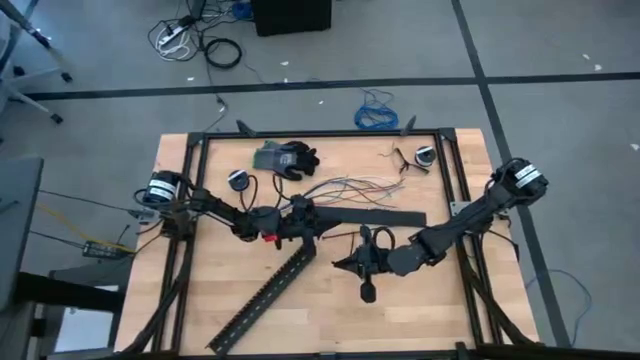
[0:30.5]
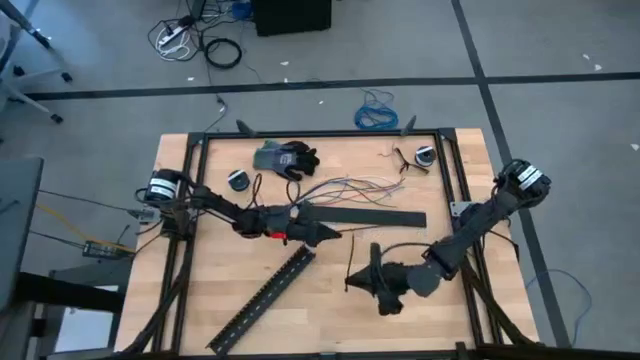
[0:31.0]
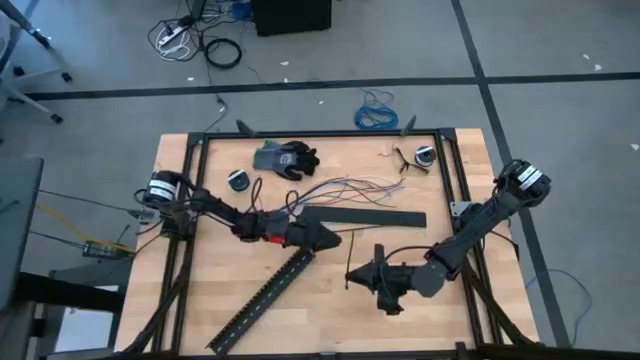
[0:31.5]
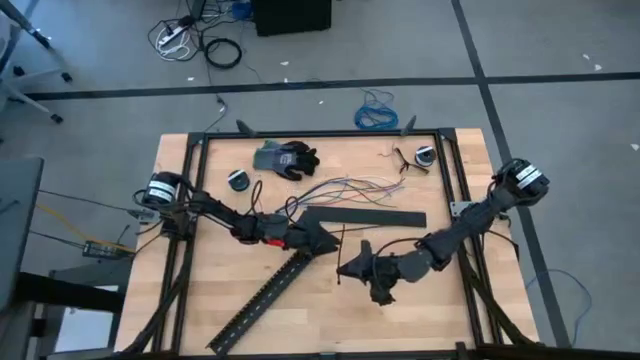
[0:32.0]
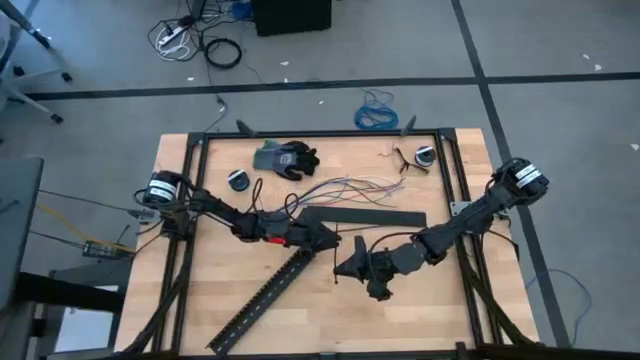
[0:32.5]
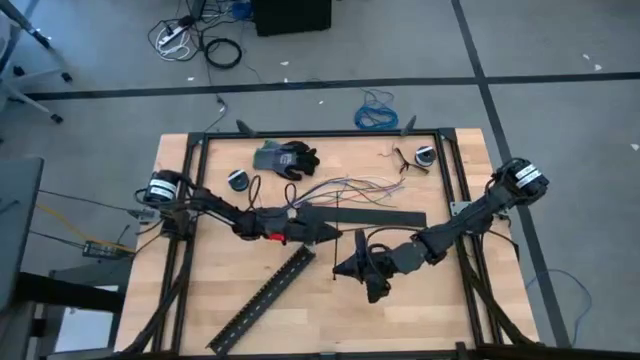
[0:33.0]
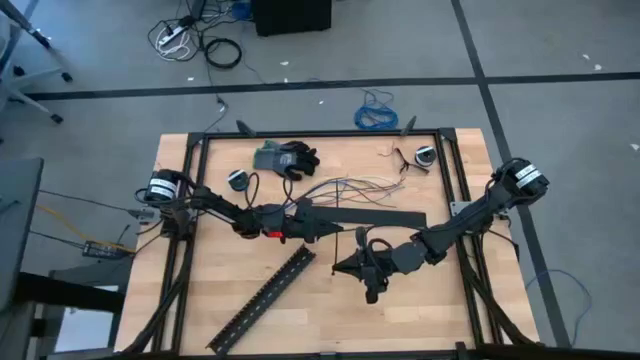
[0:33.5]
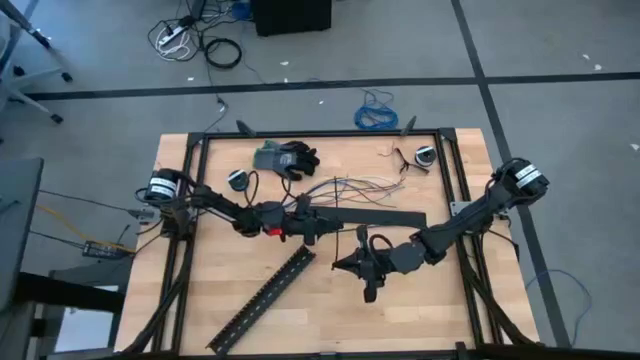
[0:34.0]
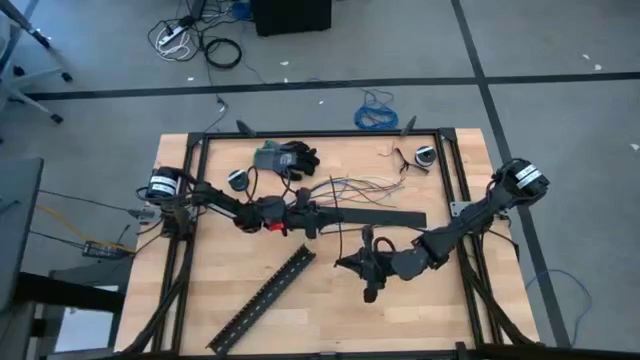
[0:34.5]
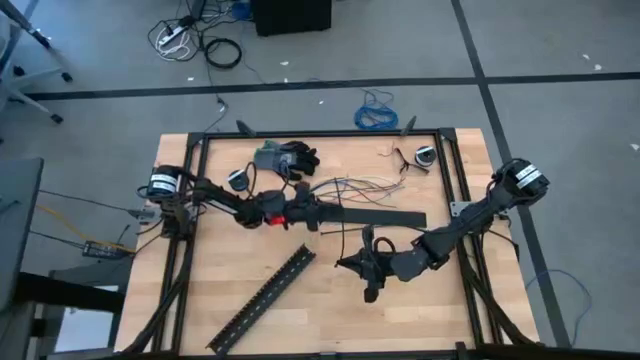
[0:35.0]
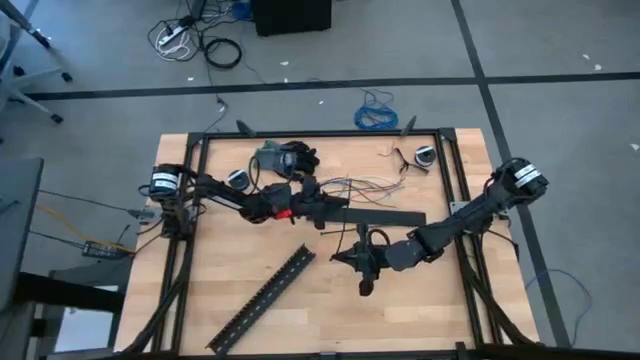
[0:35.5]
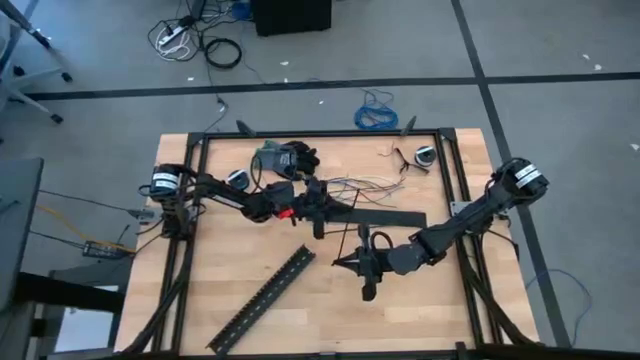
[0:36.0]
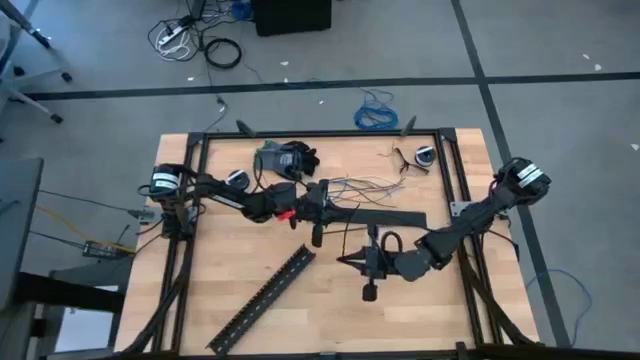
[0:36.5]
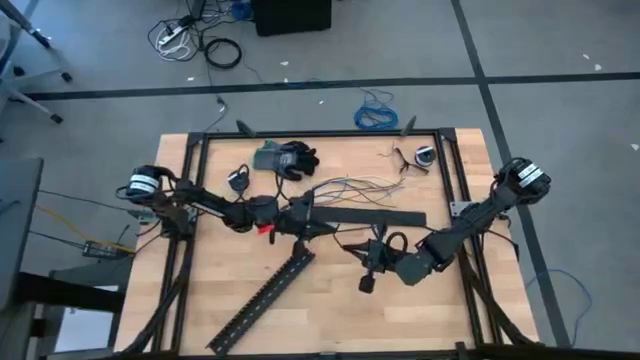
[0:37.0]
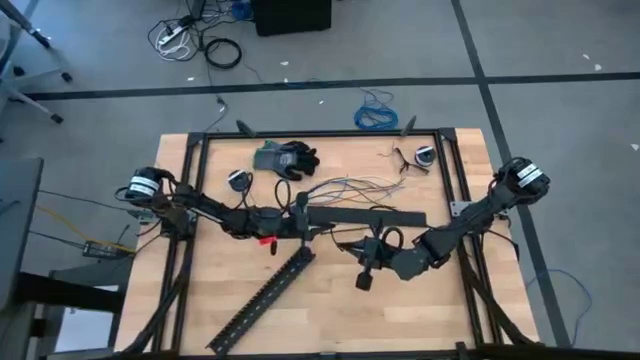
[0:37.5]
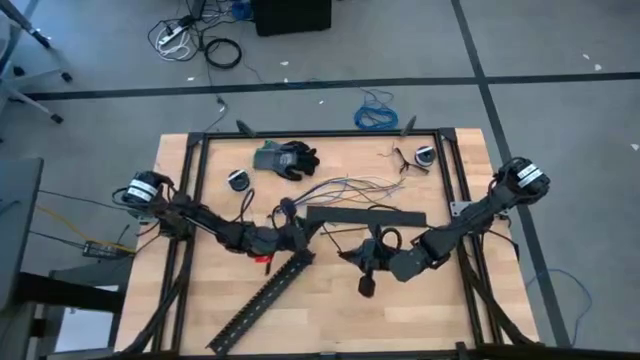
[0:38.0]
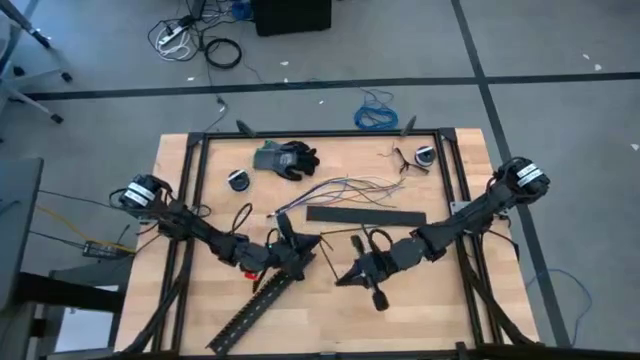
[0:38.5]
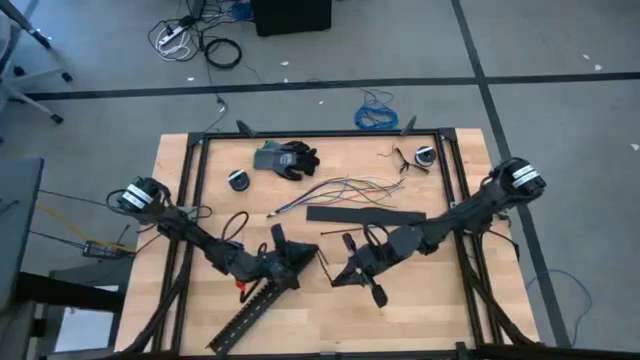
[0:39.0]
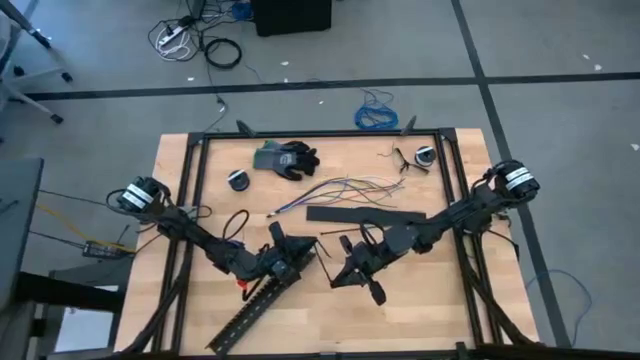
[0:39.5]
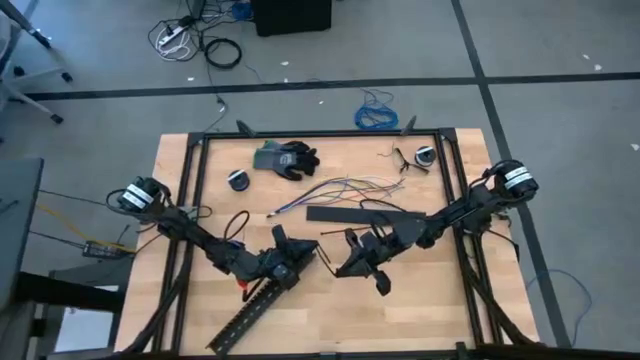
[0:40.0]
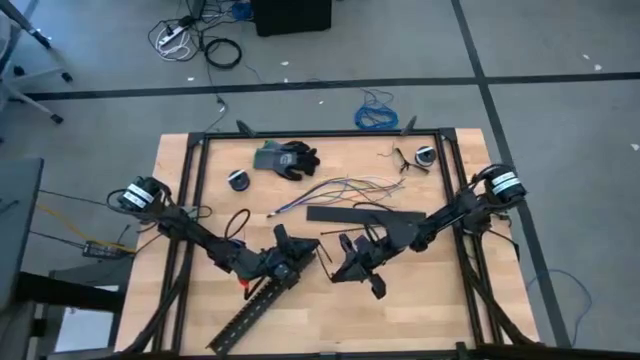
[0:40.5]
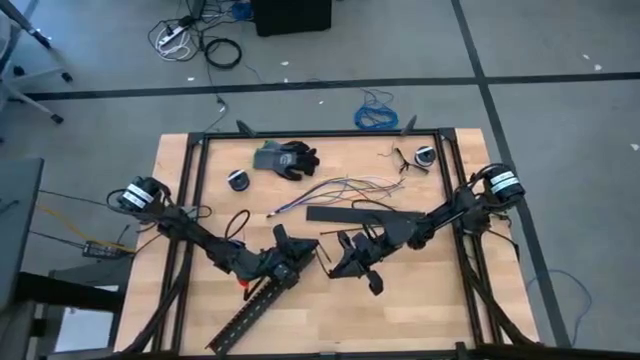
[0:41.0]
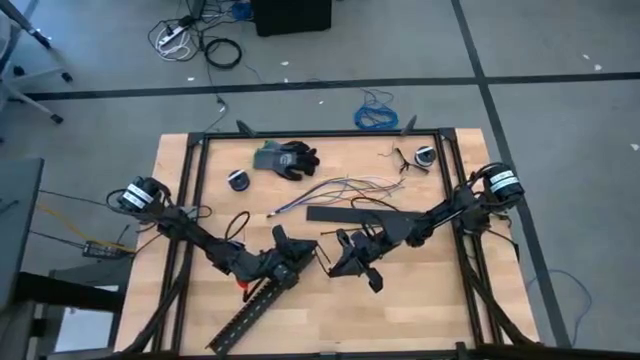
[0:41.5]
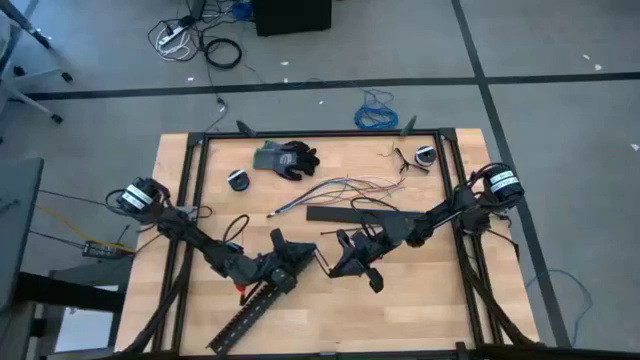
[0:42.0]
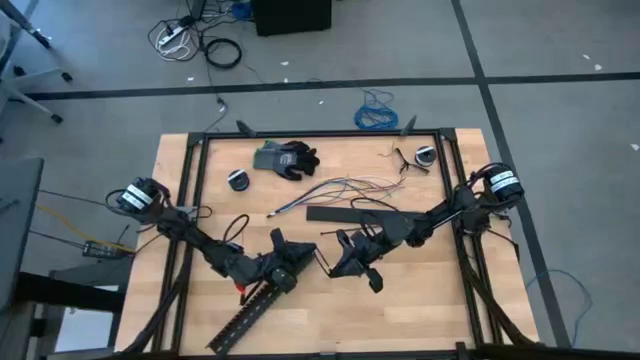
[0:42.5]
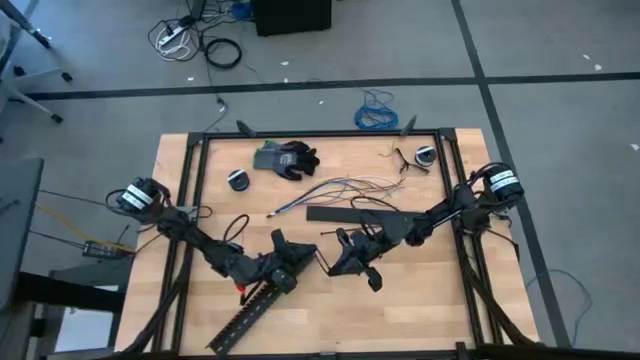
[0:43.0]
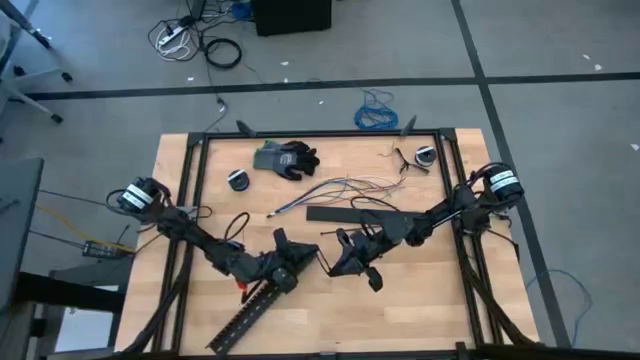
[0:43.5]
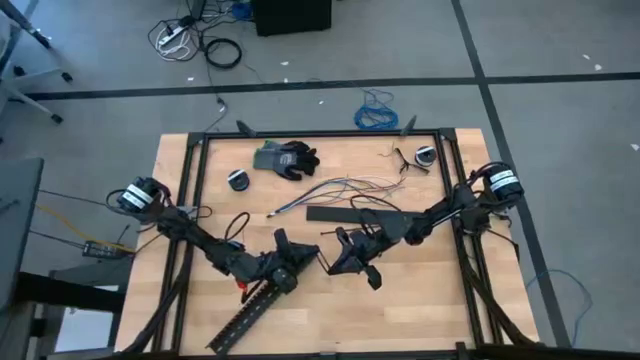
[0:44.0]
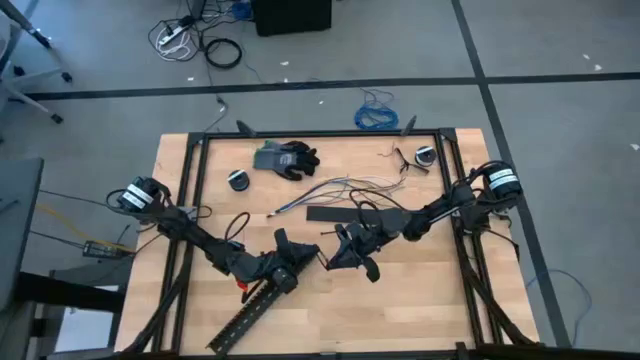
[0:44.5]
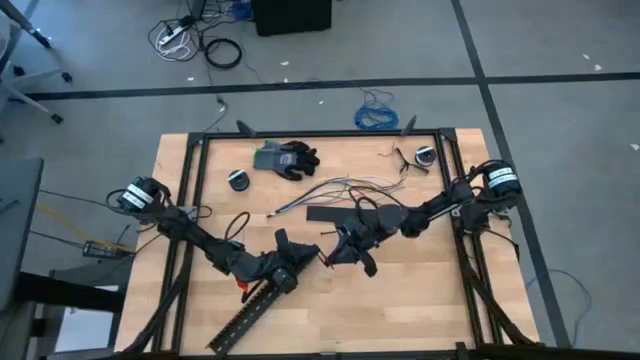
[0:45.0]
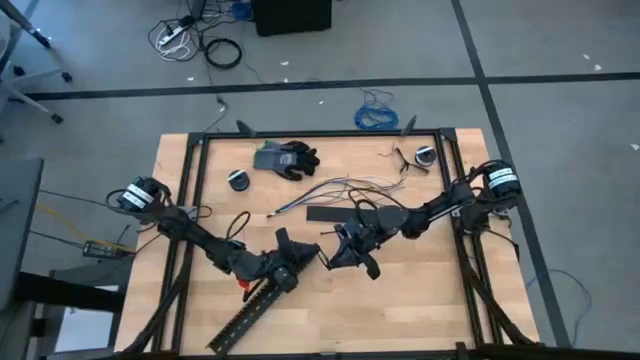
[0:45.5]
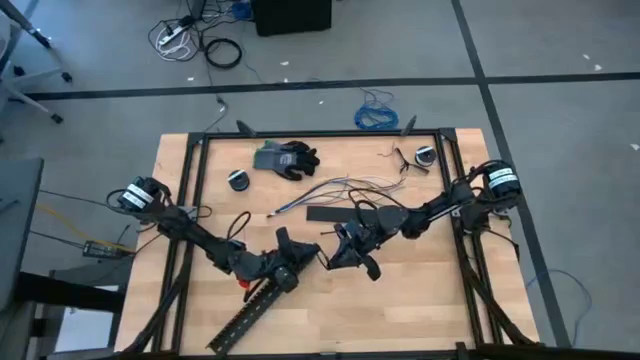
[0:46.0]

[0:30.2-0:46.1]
Task: Ziptie cables
Insert the black zip tie into the locking head

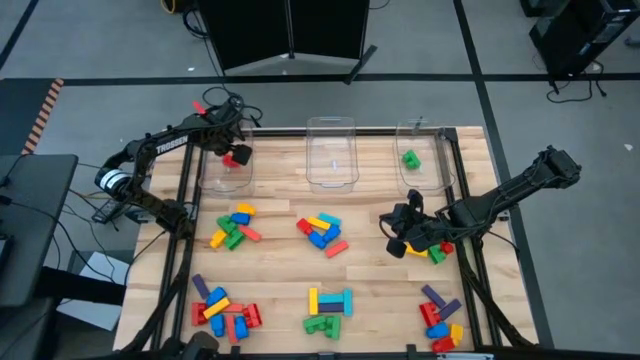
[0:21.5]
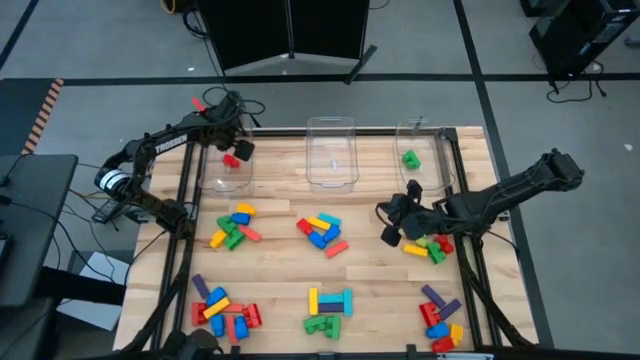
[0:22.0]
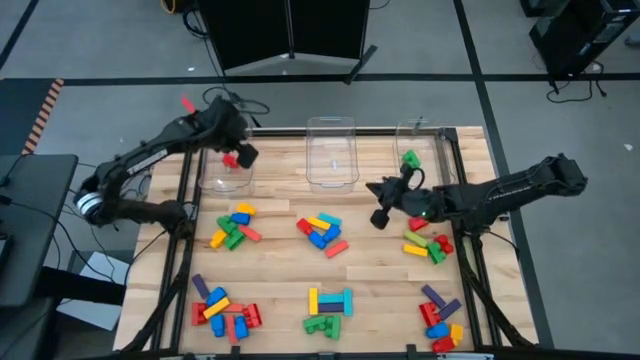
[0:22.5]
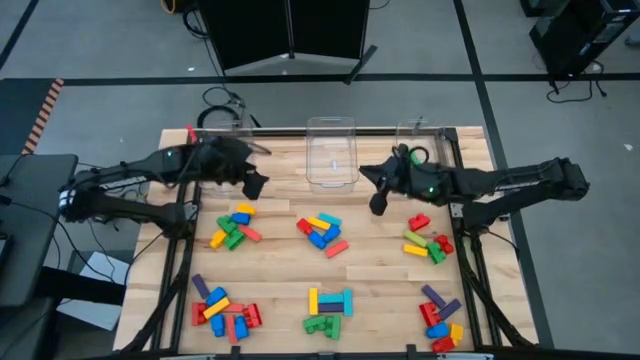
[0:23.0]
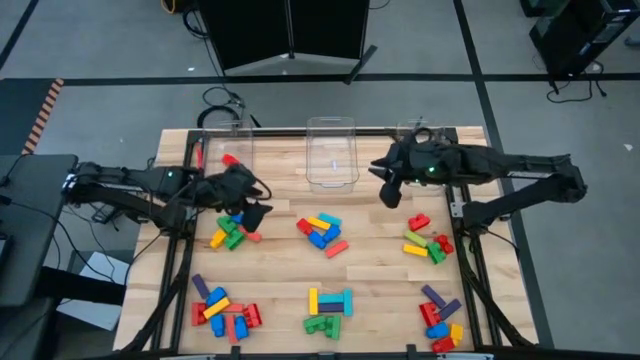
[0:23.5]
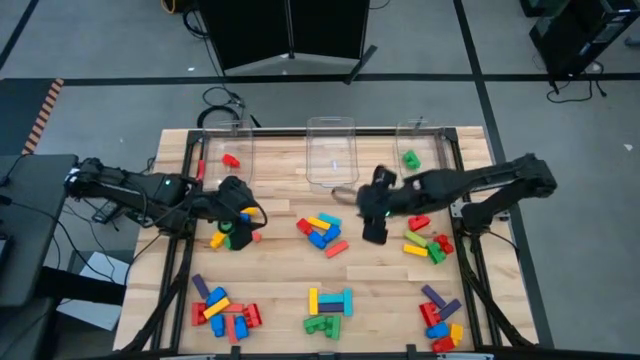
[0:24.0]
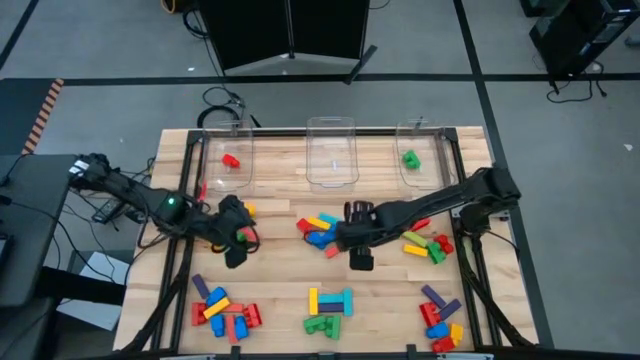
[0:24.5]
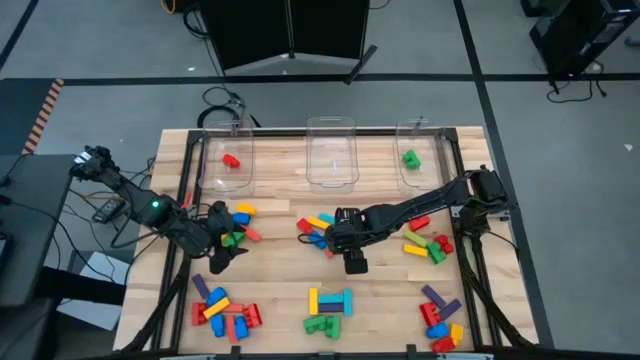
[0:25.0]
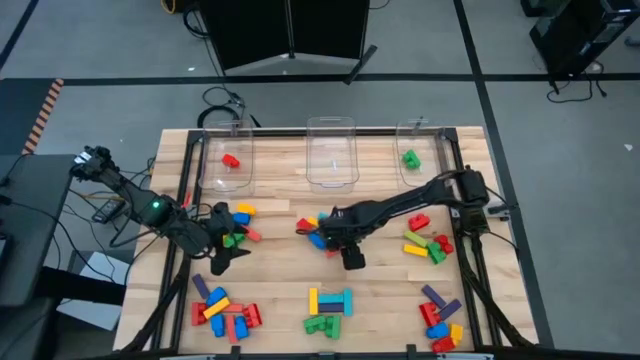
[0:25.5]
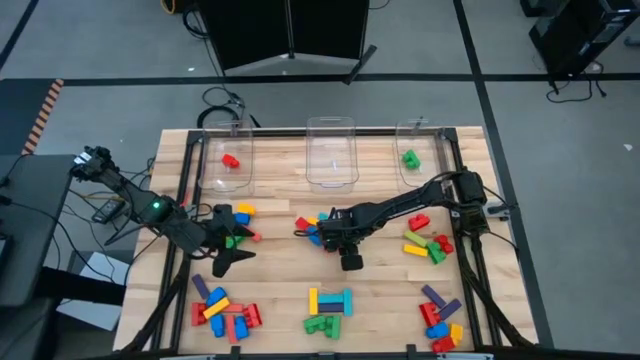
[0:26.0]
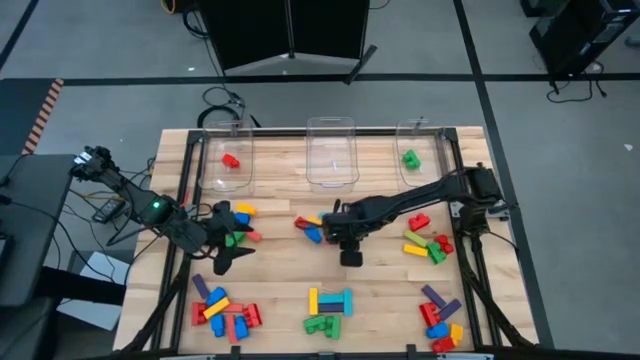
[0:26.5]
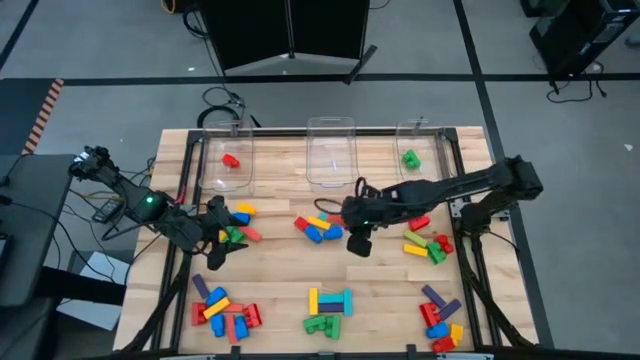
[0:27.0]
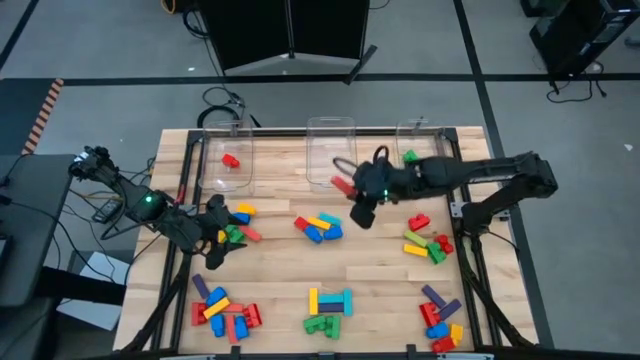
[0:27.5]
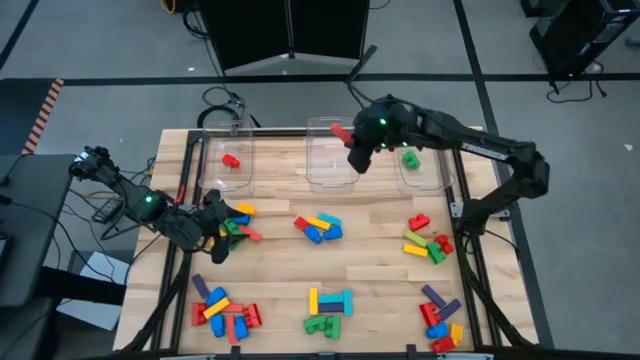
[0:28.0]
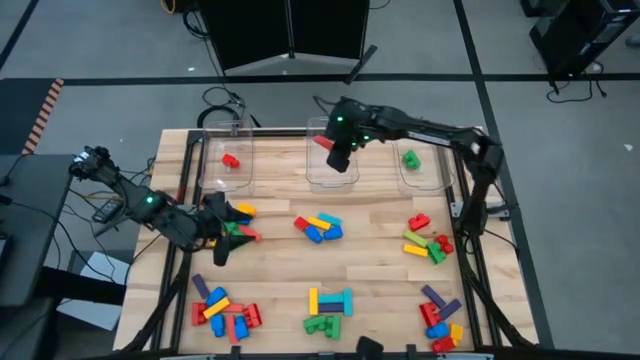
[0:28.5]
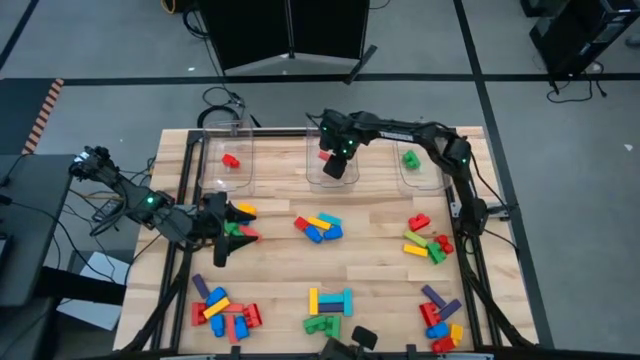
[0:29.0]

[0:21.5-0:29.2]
Task: Sort blocks by size
Put the red block into the middle transparent bin
